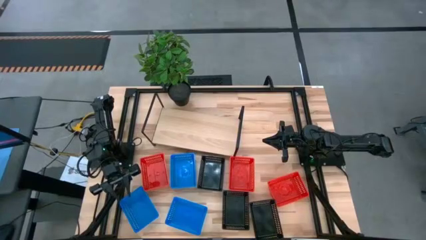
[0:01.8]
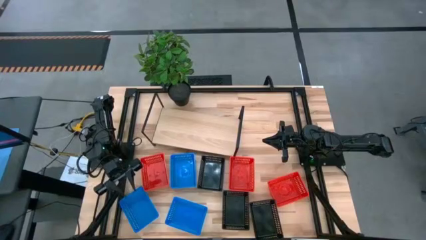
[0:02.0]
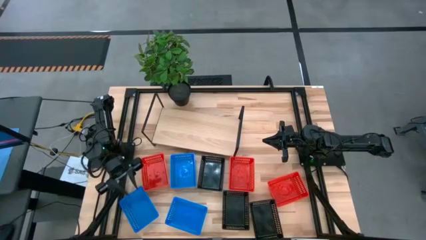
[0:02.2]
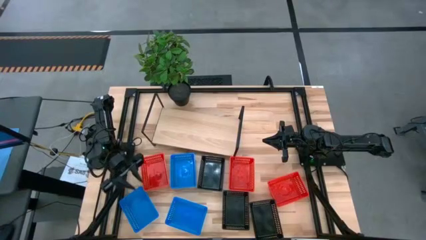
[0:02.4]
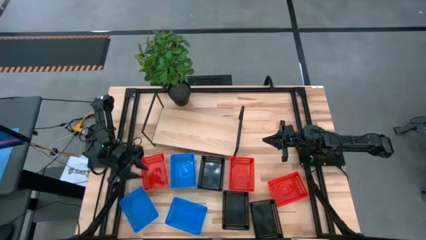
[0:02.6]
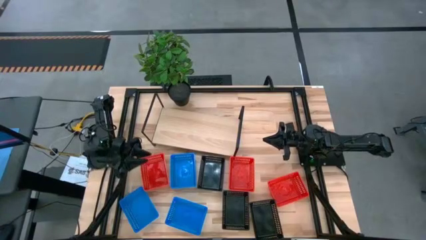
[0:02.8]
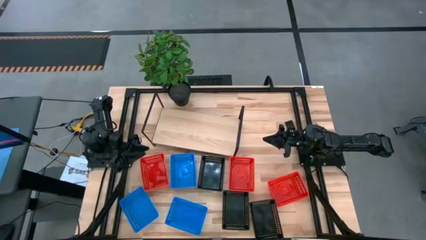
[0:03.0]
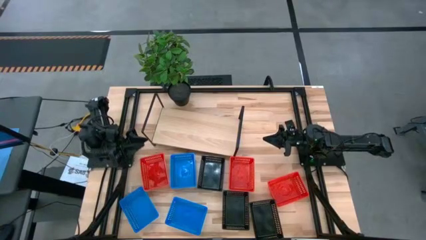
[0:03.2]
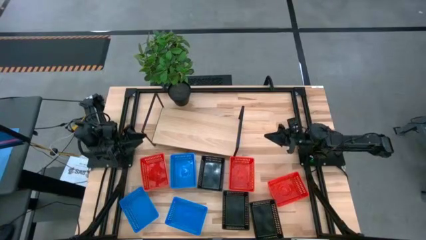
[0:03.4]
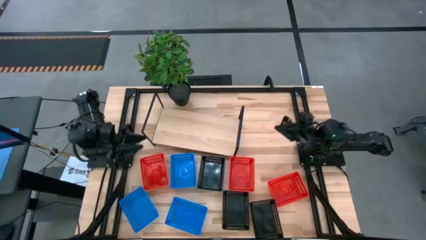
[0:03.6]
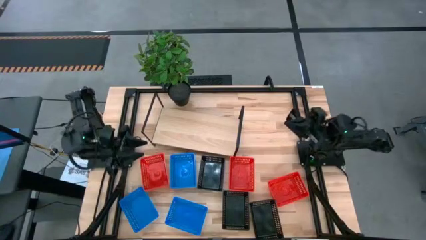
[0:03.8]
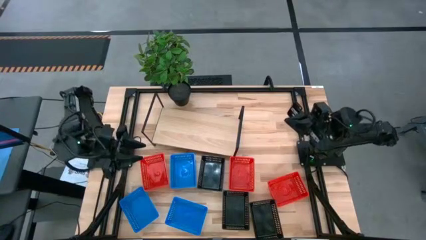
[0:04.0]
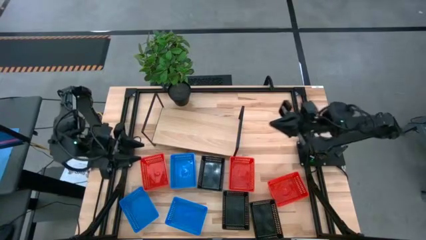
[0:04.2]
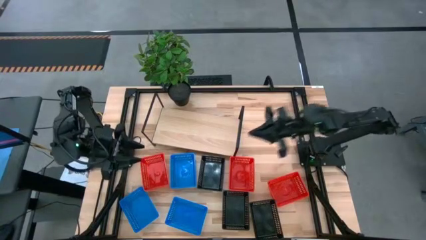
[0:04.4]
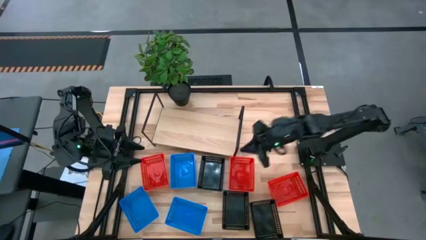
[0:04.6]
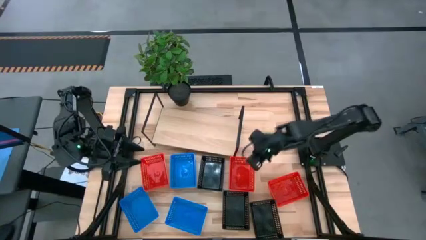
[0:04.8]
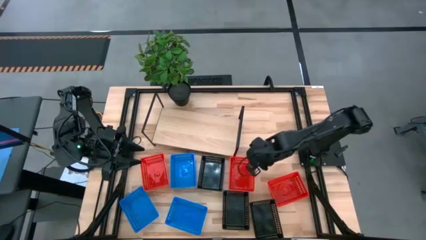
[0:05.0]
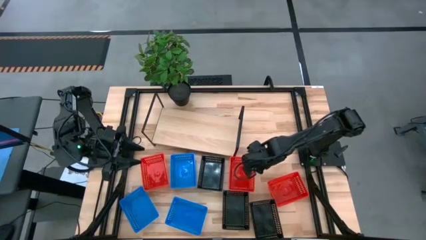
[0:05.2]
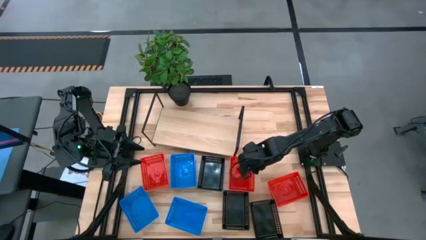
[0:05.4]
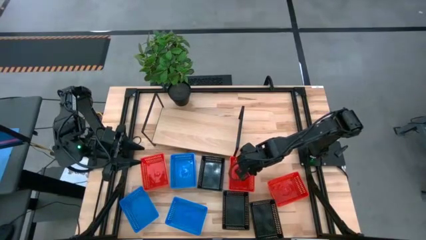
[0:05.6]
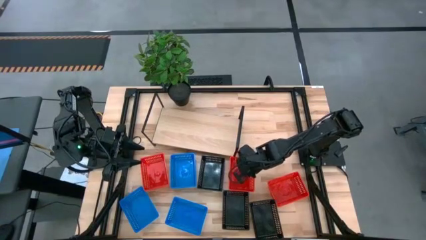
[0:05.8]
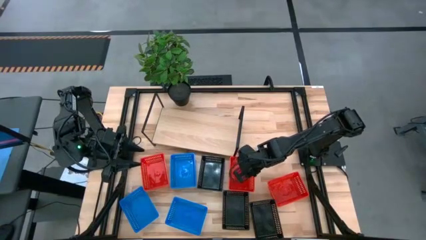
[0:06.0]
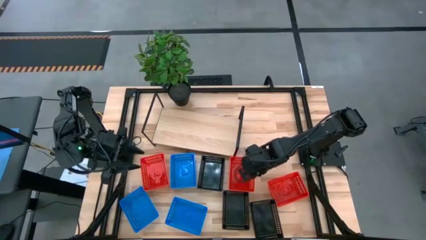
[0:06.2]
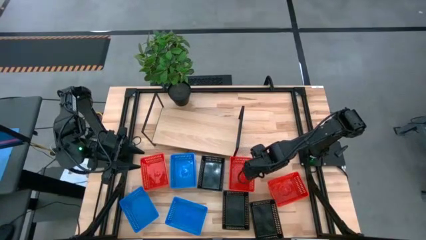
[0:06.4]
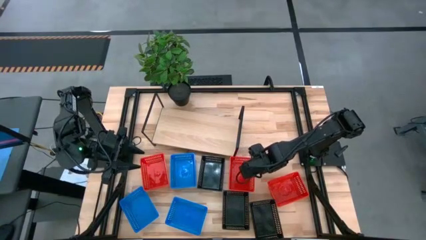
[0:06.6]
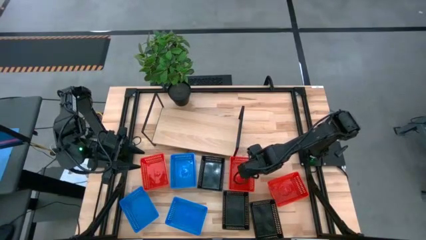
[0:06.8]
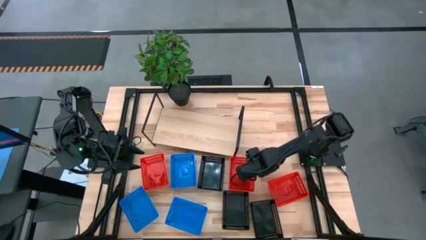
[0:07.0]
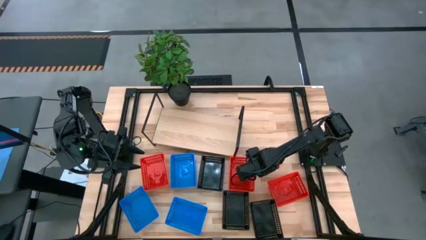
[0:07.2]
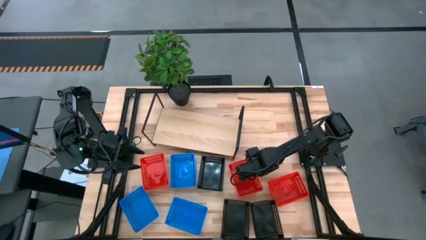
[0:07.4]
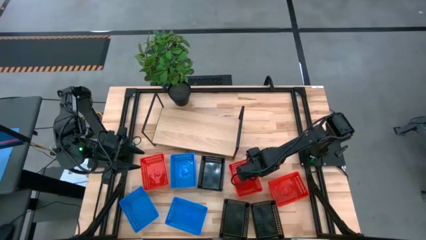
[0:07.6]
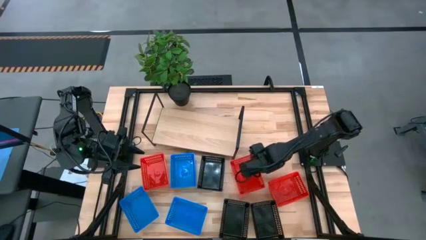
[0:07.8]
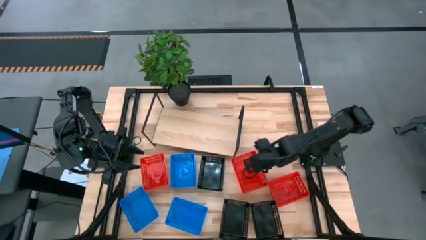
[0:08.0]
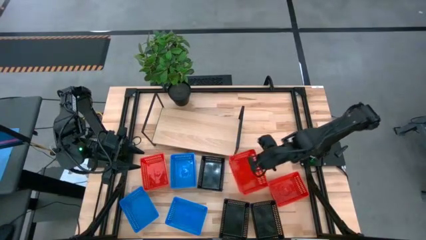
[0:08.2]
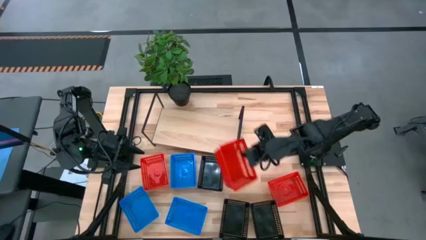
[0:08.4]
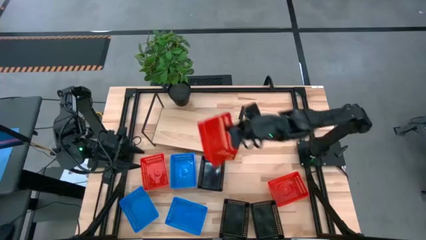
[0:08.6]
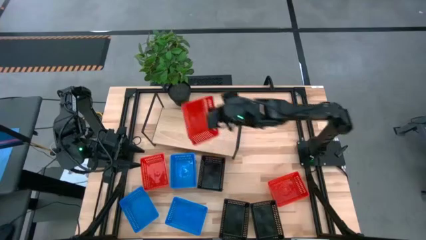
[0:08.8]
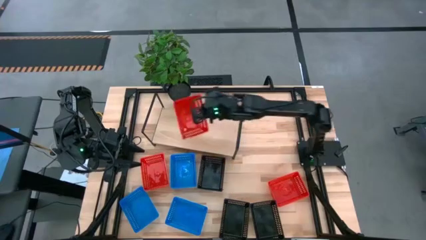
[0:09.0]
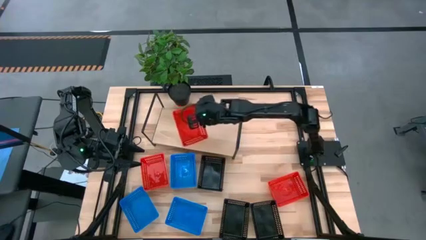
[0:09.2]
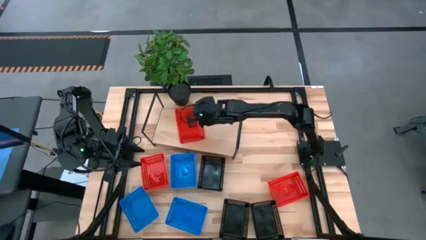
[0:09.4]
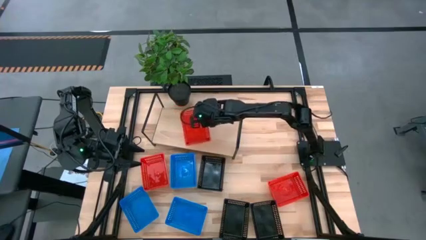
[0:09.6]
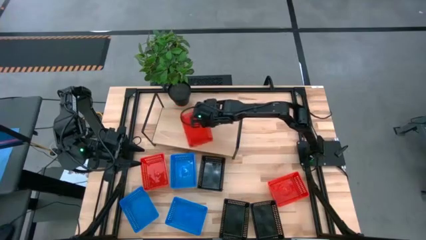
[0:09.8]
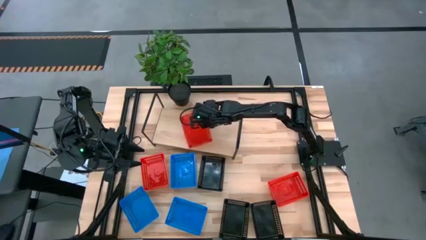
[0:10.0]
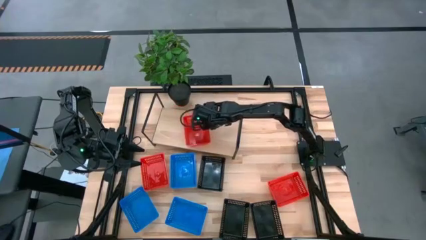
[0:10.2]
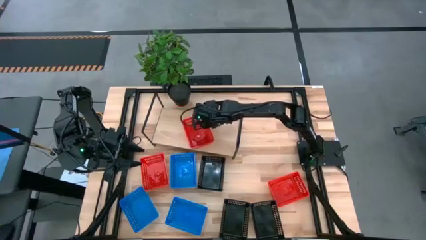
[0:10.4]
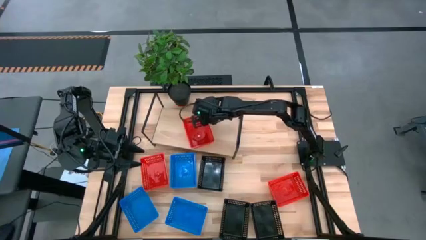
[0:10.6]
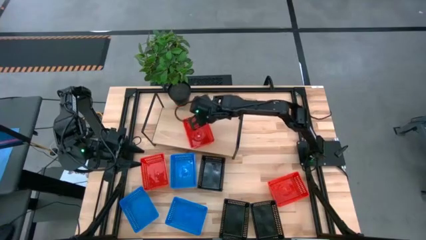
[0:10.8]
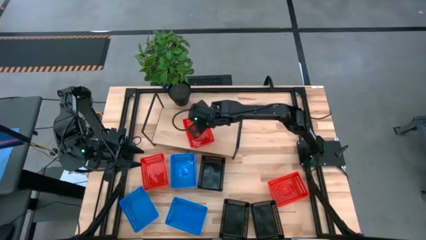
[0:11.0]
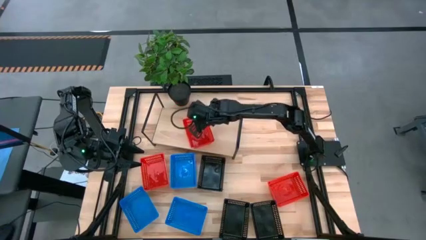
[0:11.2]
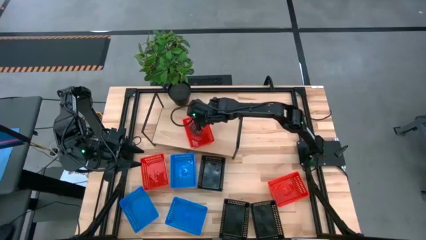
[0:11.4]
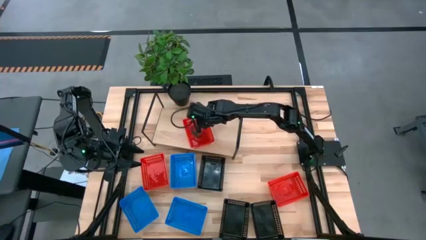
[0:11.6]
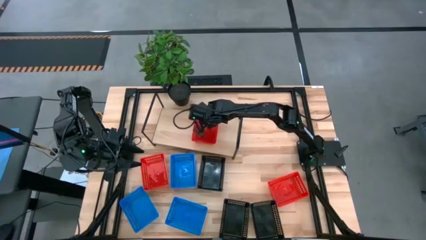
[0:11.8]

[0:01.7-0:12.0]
Task: Stack baskets on shelf by color
Put the center red basket on the shelf
